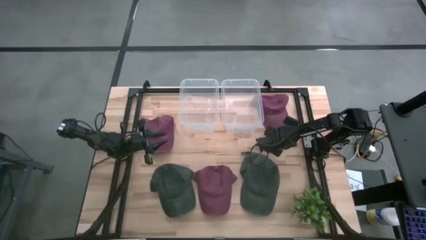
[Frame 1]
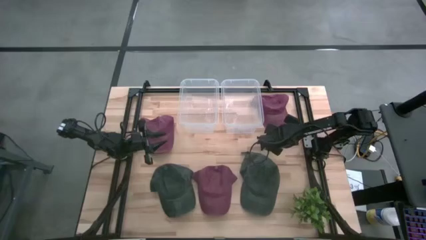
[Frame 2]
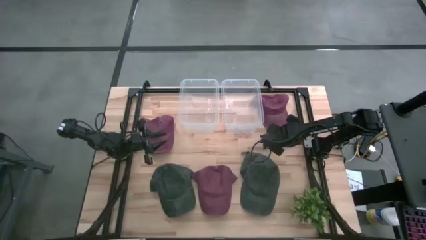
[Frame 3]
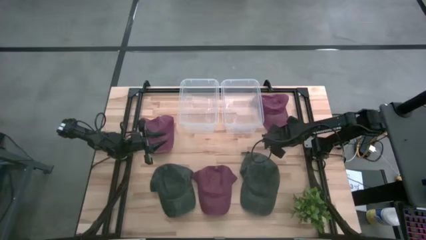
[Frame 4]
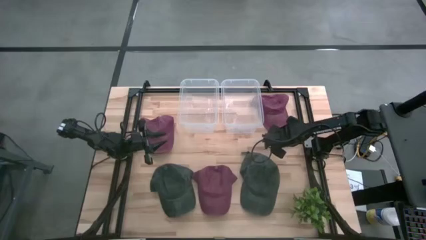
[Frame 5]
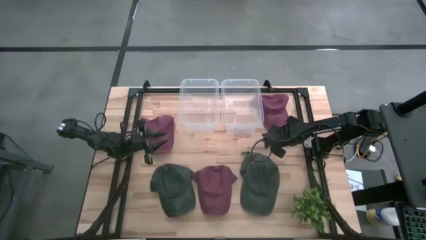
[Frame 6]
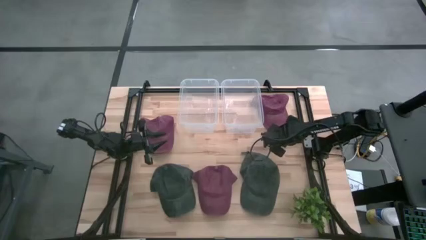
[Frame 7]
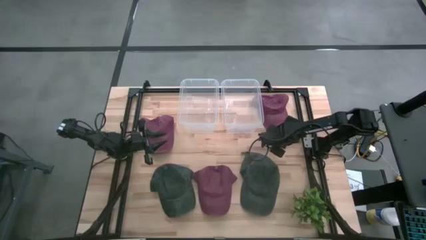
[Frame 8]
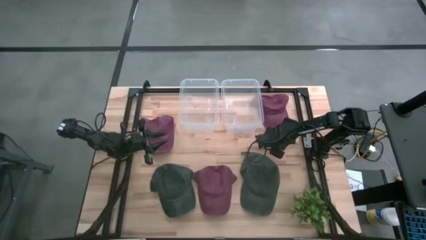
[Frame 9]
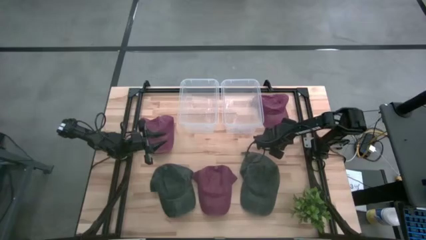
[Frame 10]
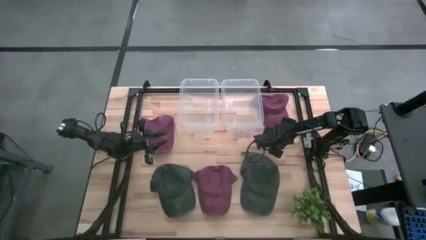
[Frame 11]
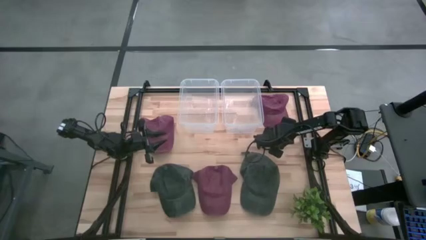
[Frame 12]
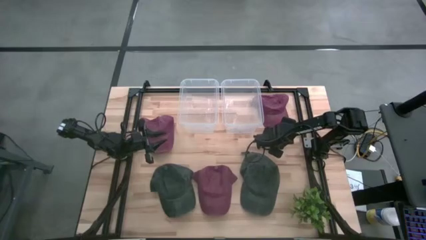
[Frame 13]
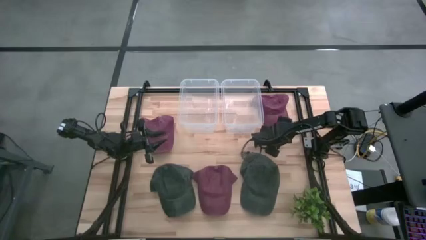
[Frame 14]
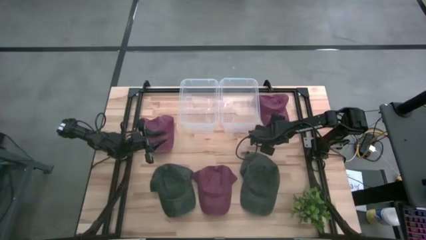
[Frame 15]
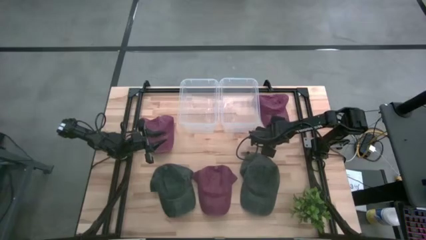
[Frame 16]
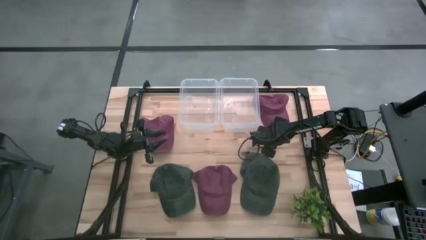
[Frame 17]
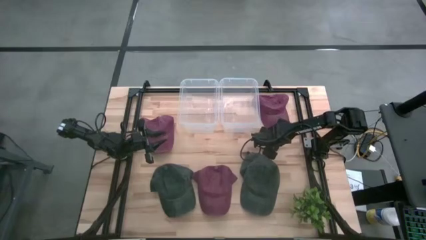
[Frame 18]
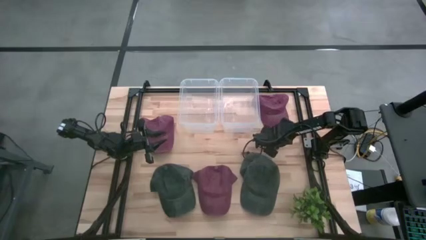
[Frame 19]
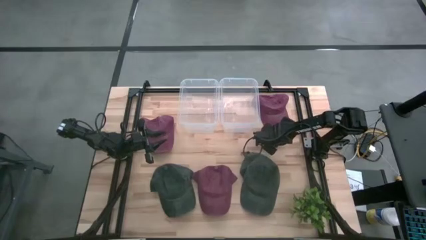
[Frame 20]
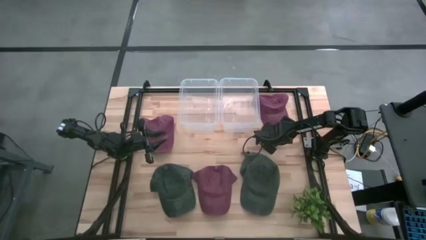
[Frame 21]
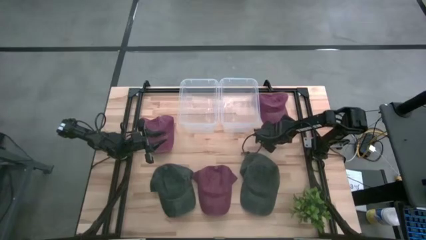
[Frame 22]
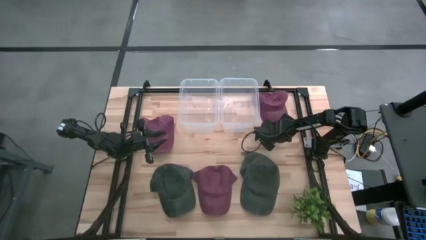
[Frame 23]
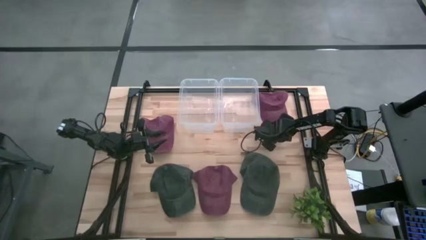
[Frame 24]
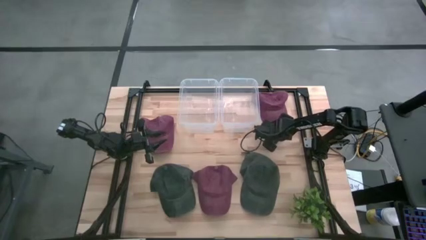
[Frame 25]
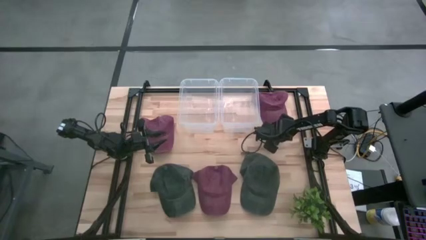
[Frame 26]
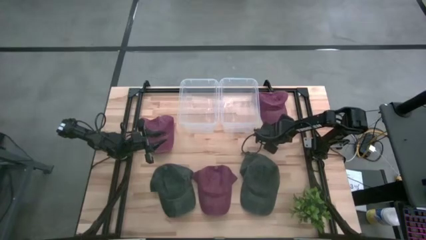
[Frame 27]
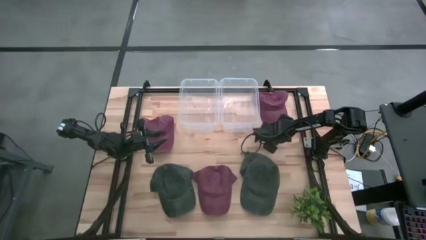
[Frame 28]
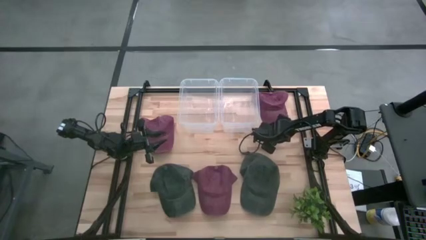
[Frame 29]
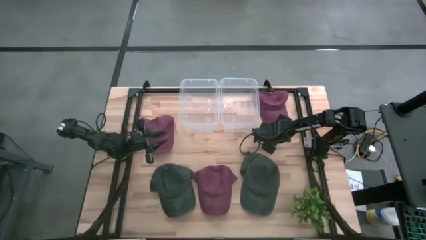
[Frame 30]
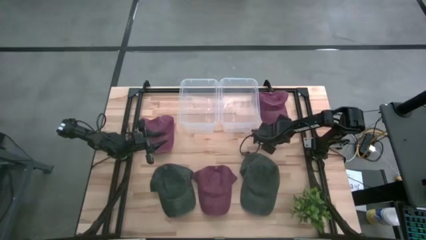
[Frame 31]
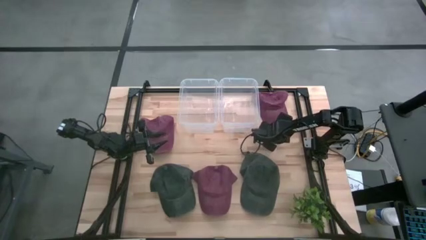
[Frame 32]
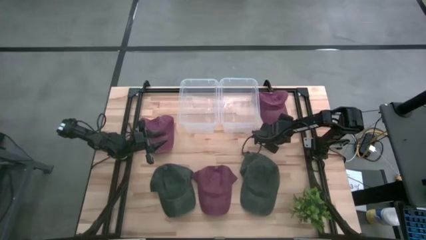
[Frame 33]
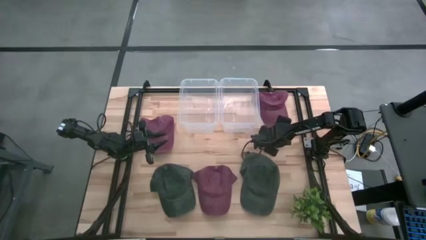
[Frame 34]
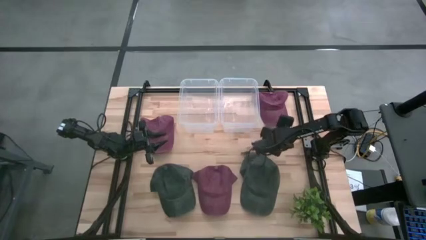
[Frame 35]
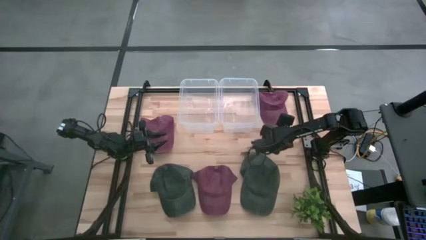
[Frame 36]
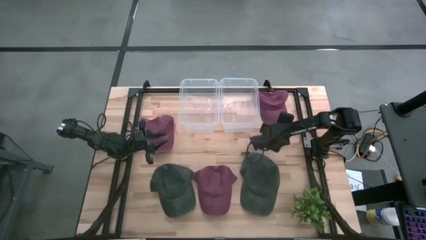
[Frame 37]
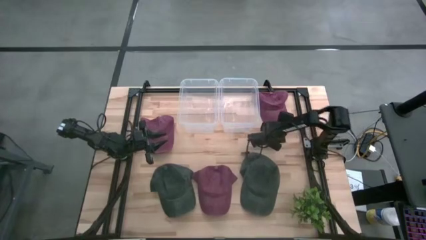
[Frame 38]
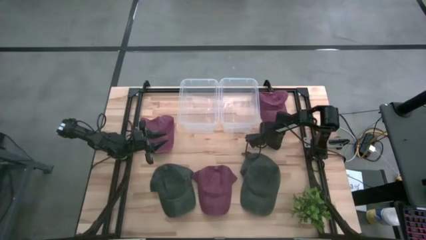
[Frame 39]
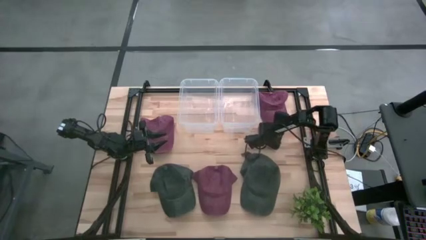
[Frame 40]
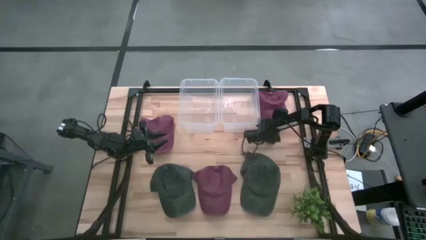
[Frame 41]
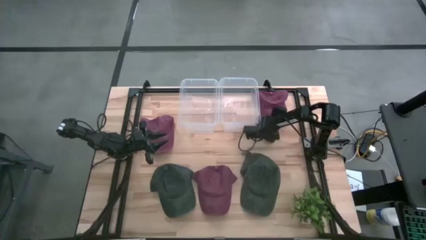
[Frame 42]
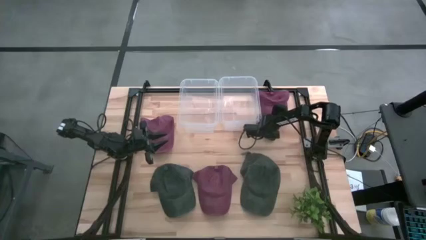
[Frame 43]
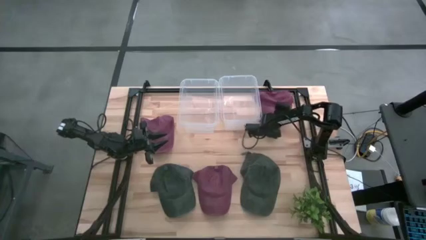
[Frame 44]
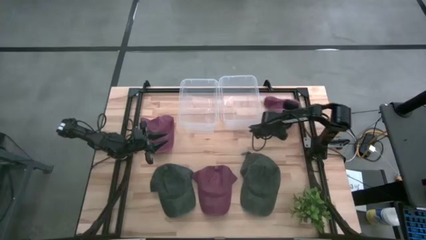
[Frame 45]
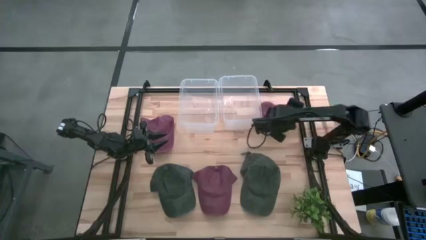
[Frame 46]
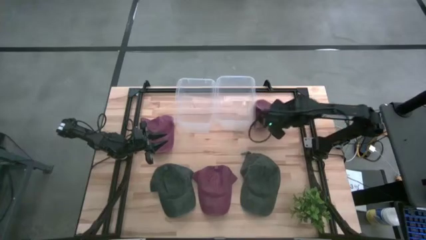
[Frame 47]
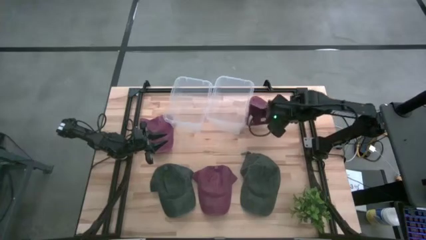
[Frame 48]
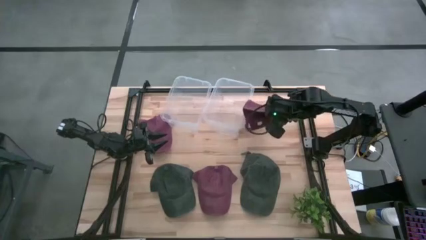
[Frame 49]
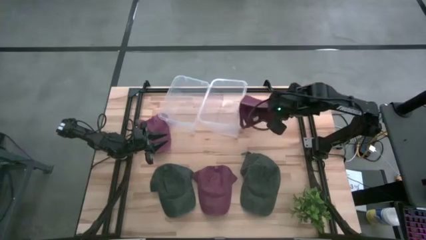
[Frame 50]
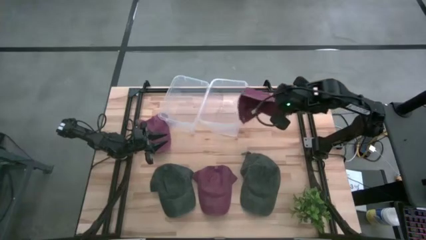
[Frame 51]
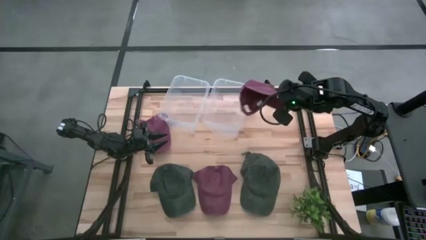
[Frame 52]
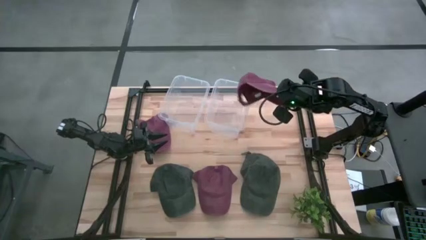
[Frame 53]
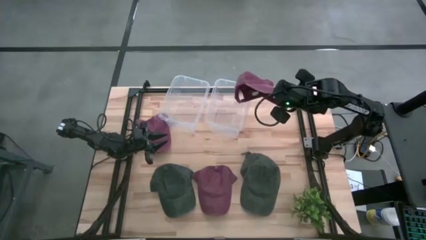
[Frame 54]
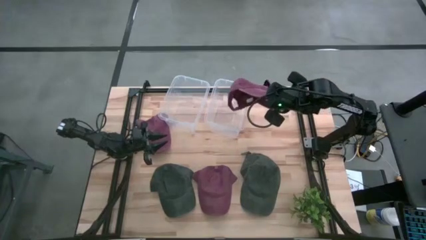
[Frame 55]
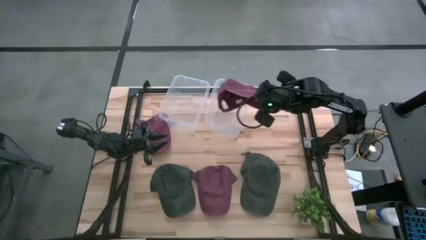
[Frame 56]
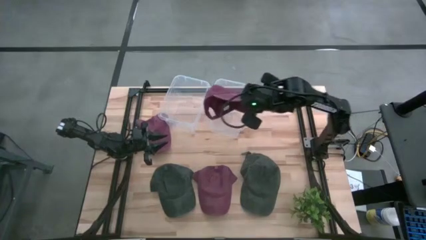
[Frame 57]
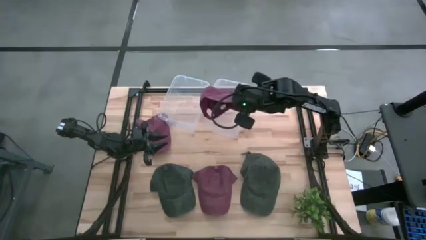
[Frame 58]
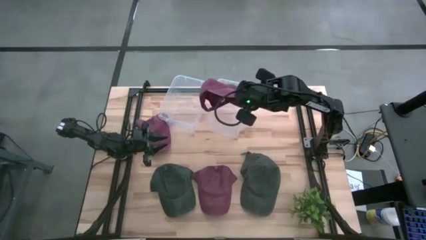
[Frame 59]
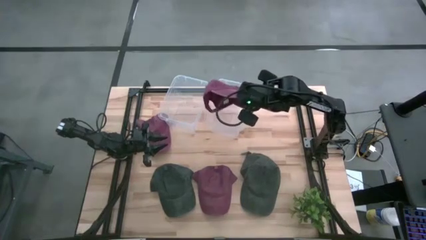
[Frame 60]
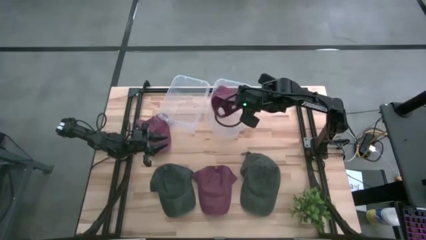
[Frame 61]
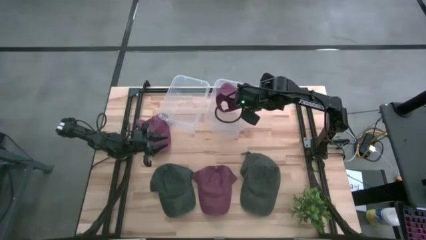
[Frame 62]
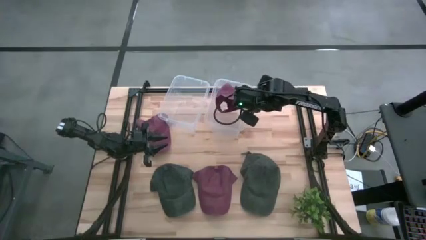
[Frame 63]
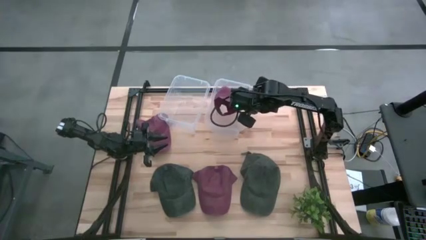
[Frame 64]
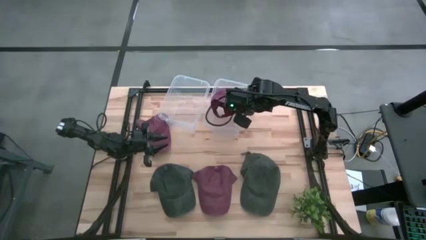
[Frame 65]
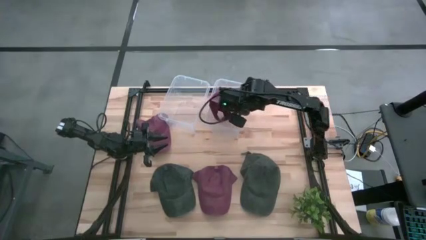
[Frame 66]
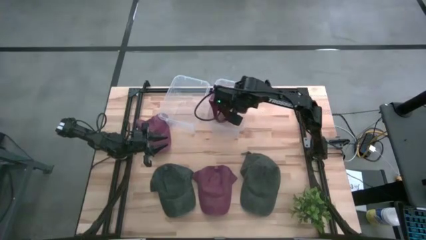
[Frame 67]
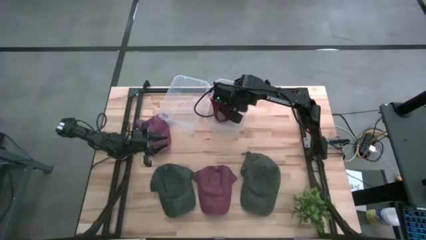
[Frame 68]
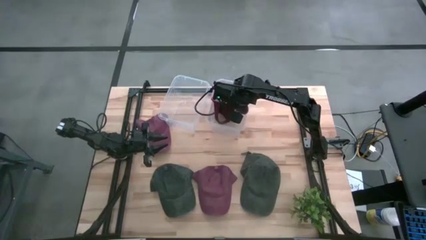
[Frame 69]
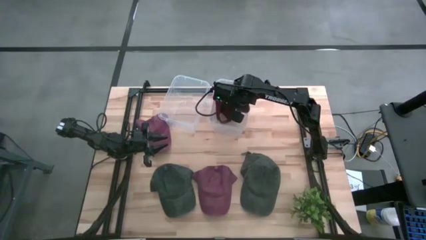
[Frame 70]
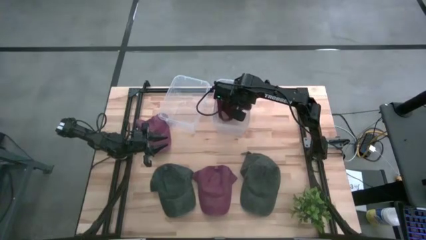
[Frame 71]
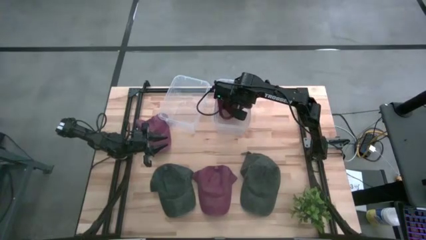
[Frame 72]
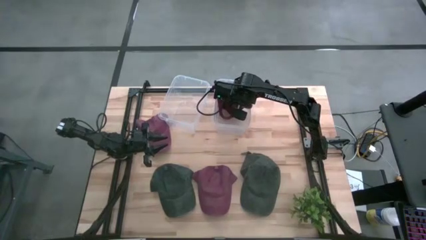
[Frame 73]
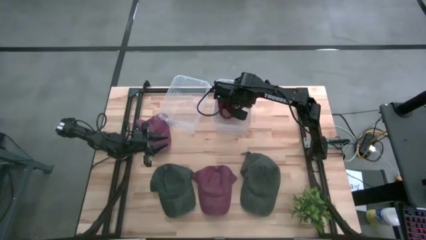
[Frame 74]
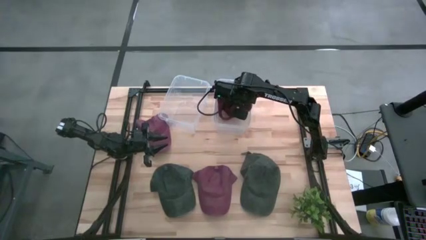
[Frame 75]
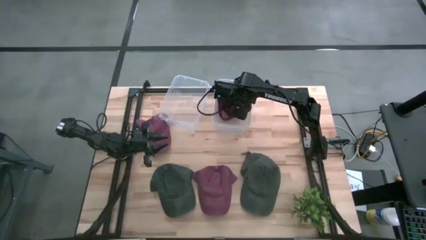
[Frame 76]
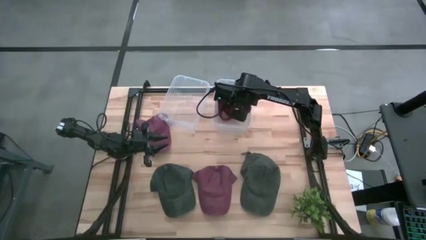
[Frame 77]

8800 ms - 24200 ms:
Task: Pick & Place hat
Put the top right red cap into the right transparent bin

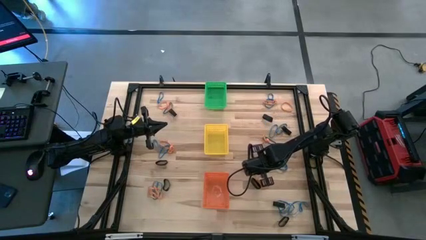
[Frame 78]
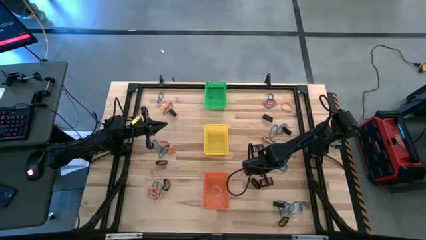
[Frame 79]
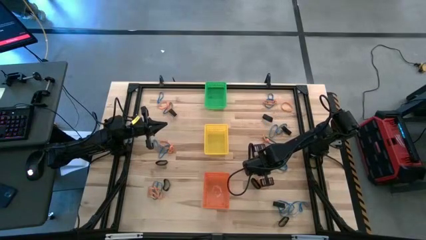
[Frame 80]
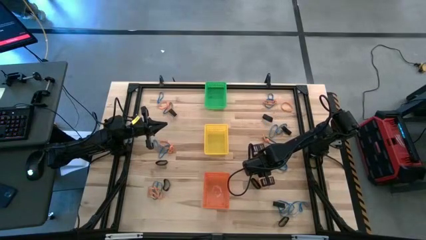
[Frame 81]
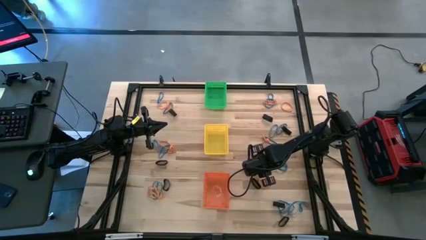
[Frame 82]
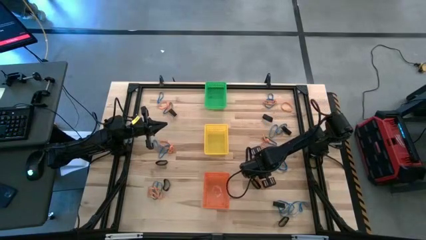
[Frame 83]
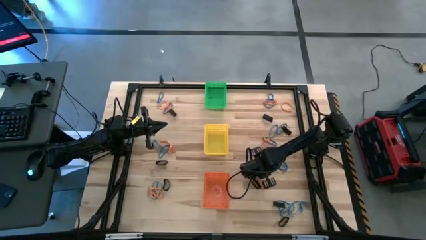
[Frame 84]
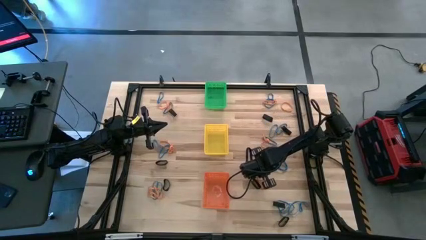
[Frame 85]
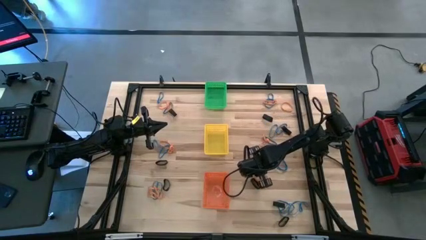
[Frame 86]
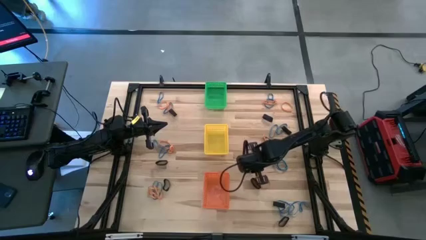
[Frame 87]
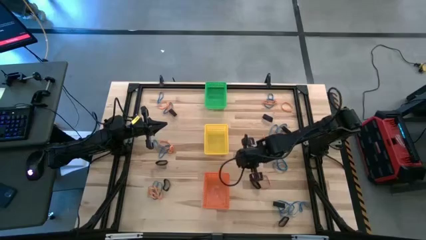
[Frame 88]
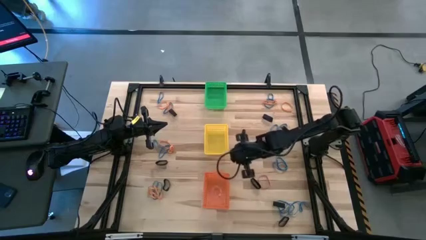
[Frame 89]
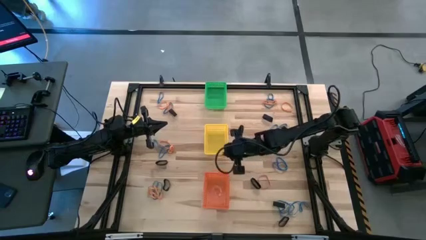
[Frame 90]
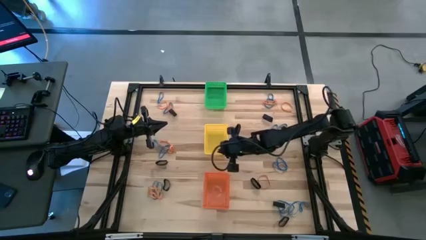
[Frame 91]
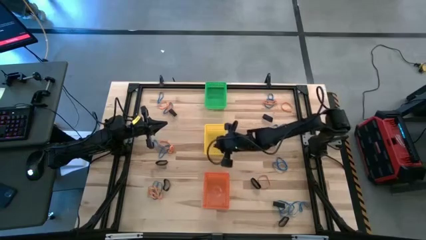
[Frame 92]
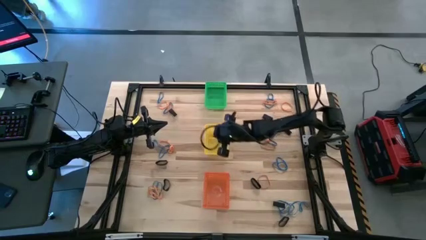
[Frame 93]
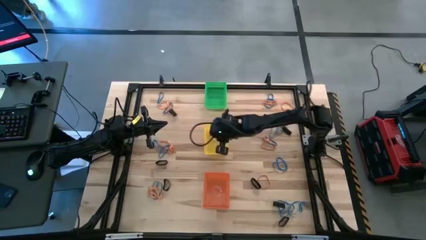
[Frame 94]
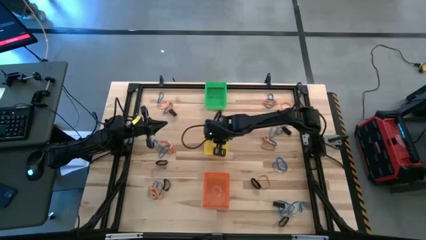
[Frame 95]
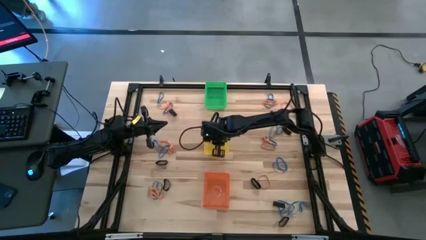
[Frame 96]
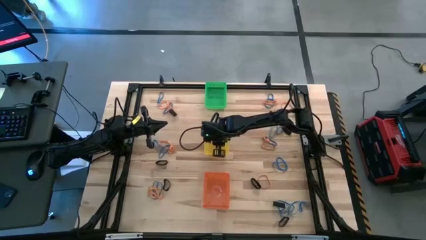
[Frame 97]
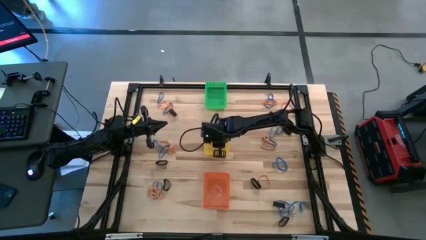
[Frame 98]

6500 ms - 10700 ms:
Task: Sort rubber bands into baskets
Put the orange rubber band into the yellow bin
